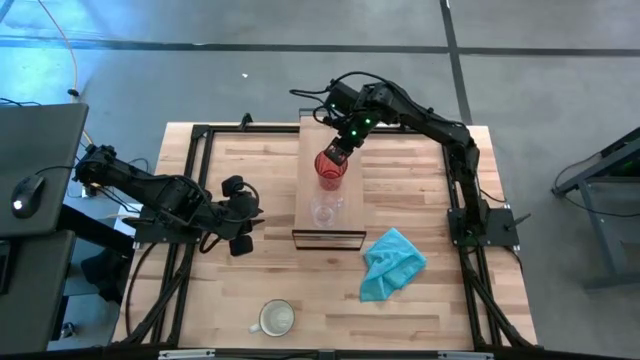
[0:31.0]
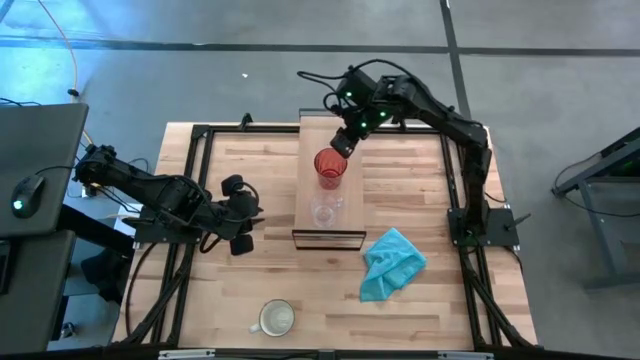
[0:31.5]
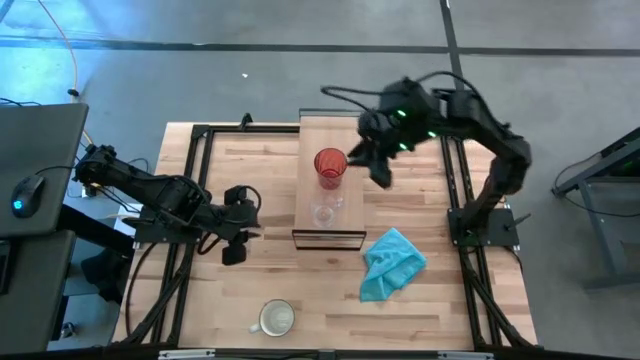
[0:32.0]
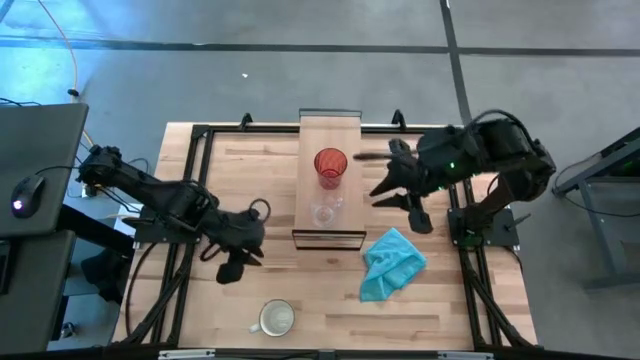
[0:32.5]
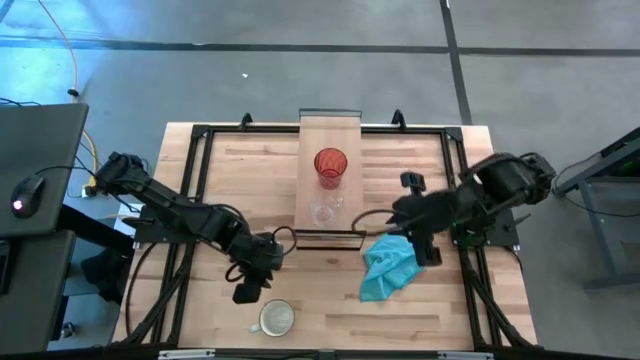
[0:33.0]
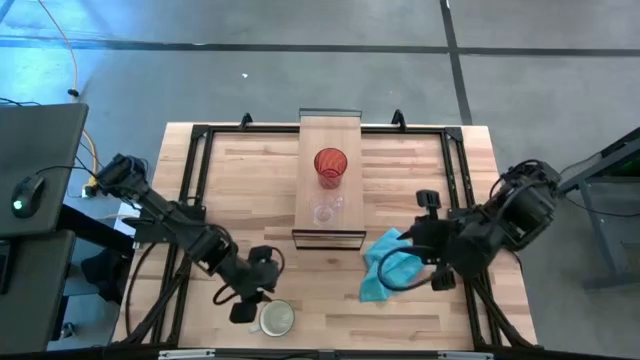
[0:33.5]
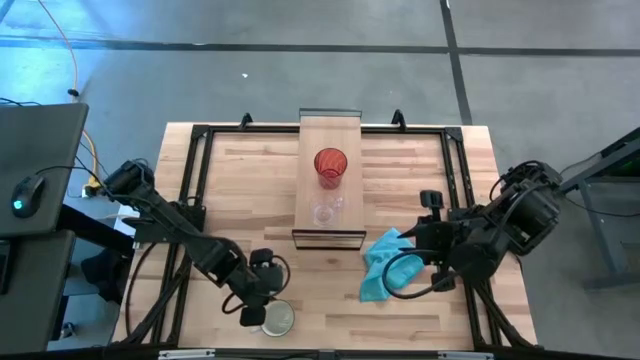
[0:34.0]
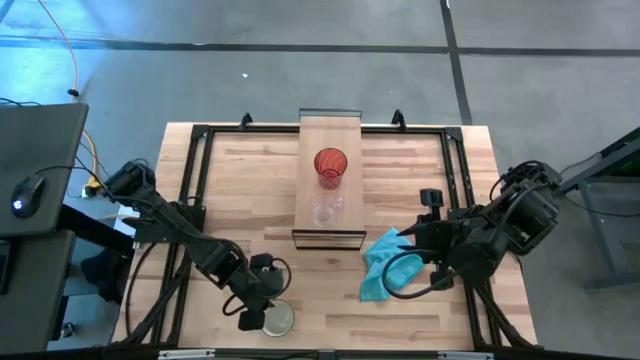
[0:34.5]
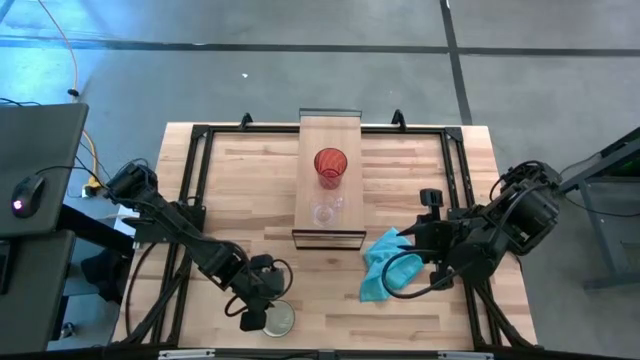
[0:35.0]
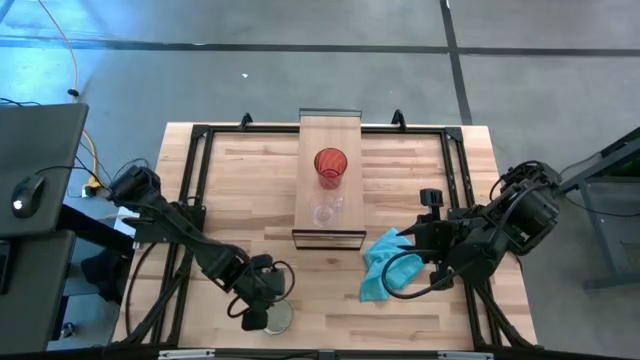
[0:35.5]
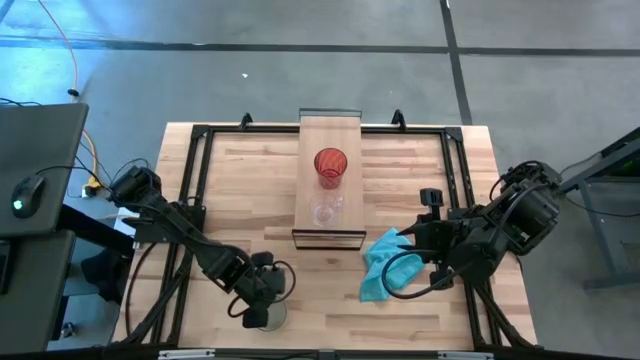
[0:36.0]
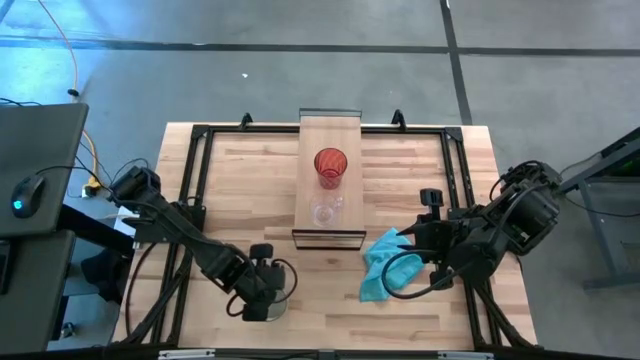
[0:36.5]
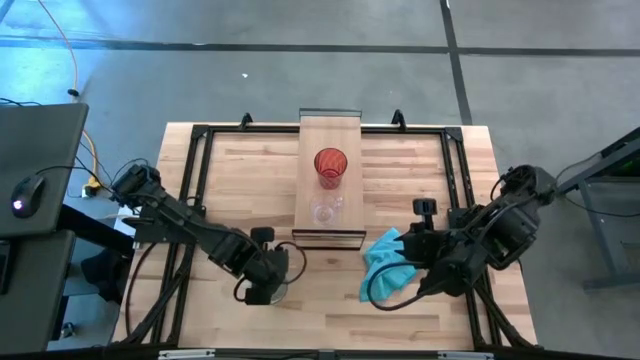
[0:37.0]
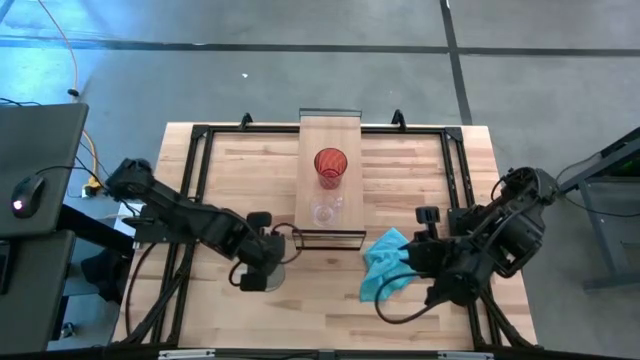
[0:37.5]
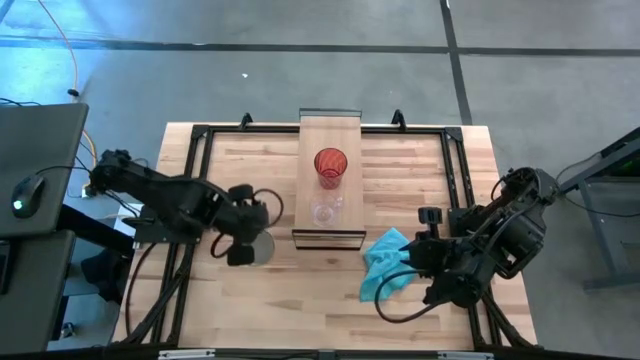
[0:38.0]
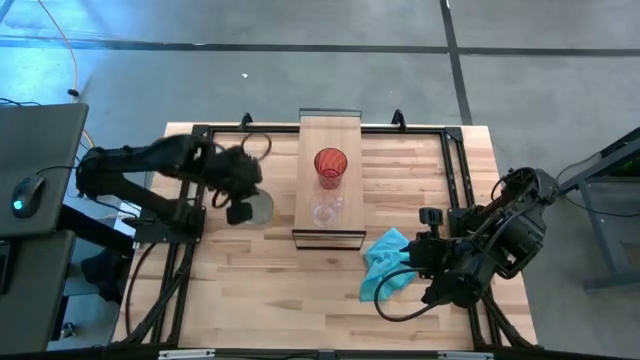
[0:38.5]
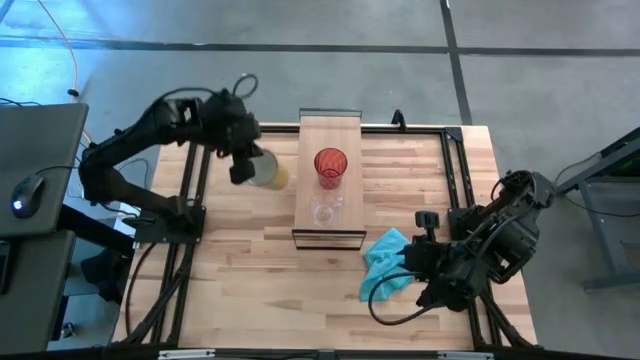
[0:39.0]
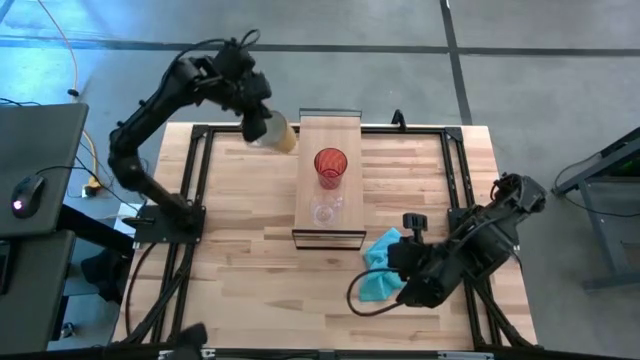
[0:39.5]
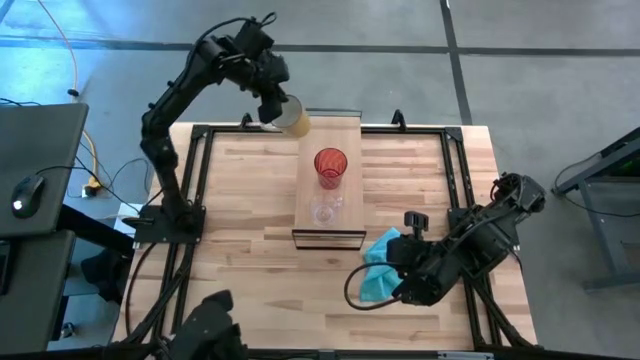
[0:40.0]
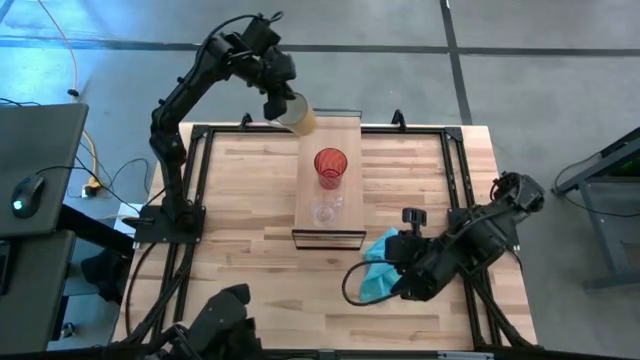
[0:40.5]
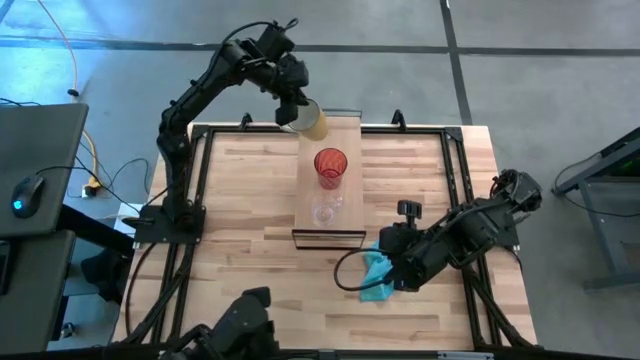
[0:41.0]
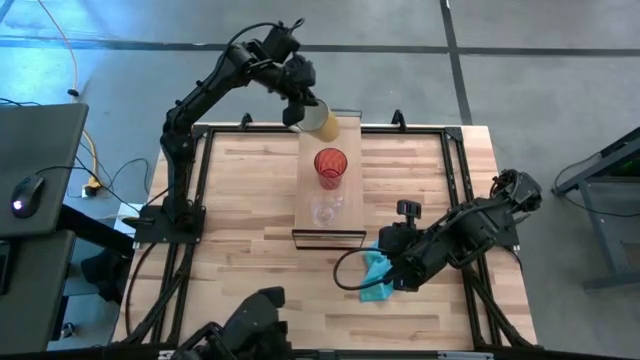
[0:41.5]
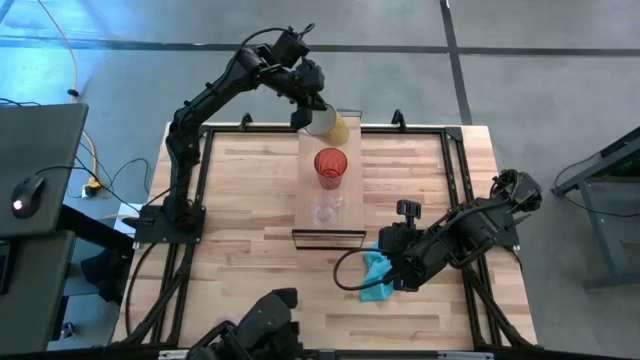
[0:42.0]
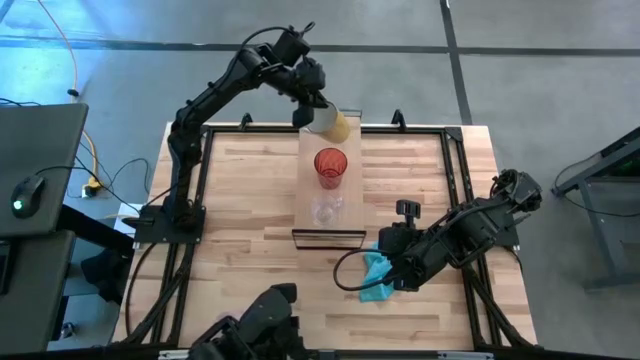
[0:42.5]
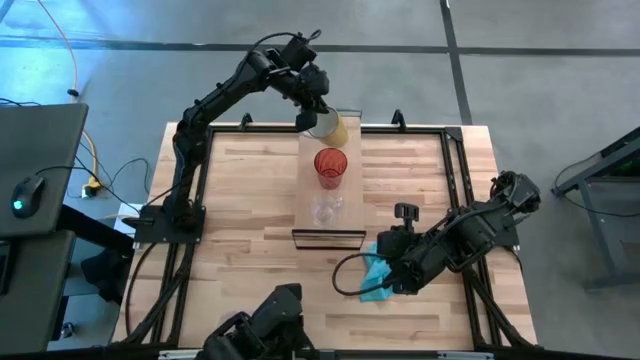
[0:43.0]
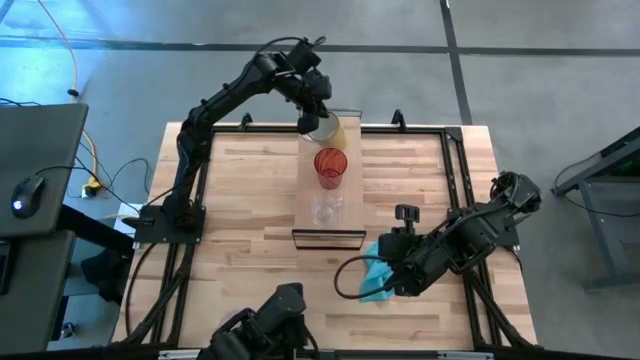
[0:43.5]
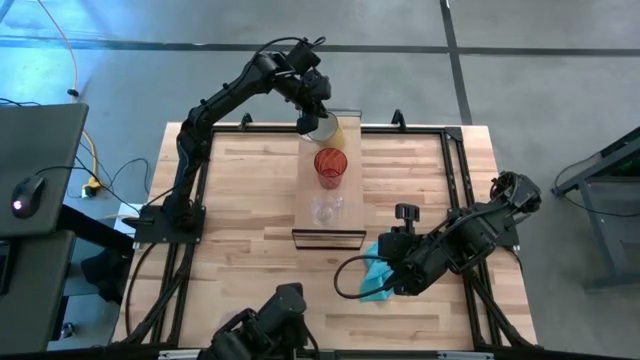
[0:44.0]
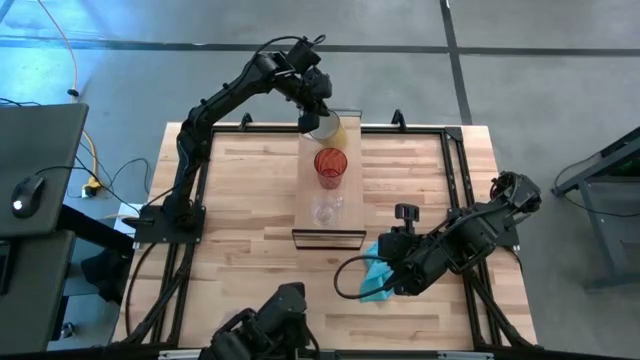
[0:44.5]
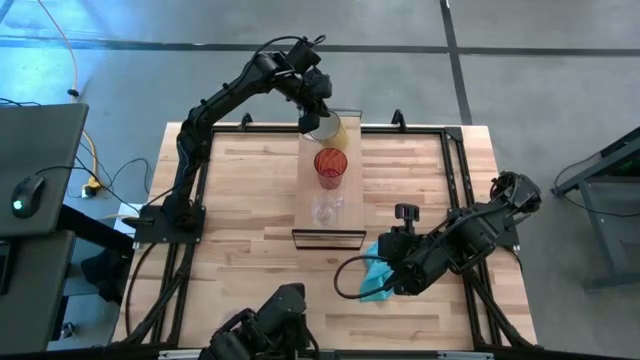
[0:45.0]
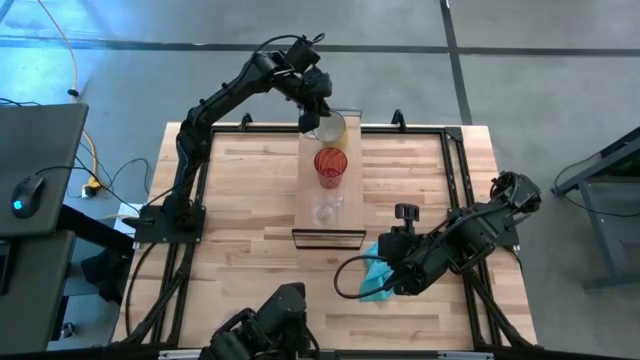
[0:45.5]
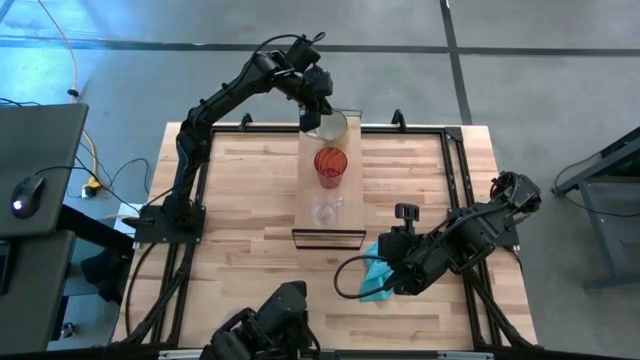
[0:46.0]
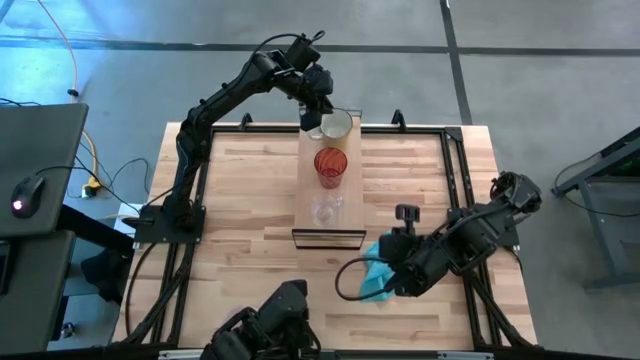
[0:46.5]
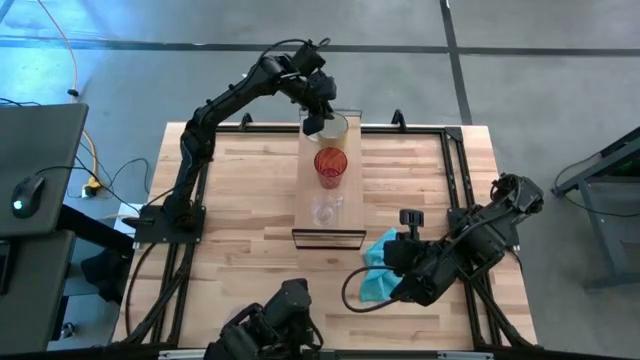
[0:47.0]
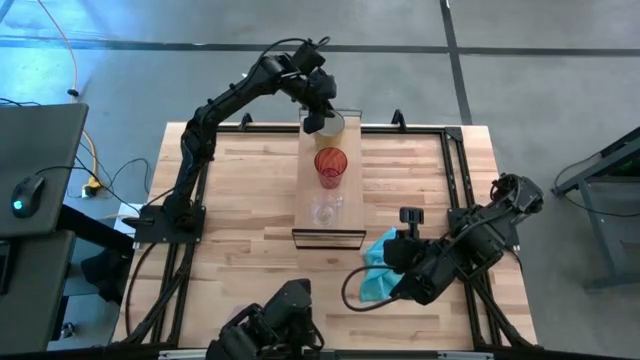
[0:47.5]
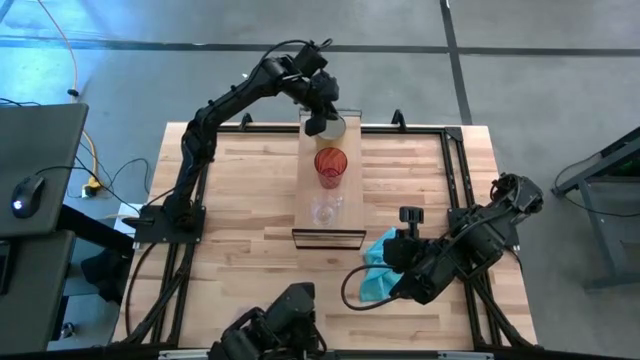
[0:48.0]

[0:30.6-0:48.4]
Task: Stack small to large cups/mugs on shelf
Put the yellow mug on the shelf

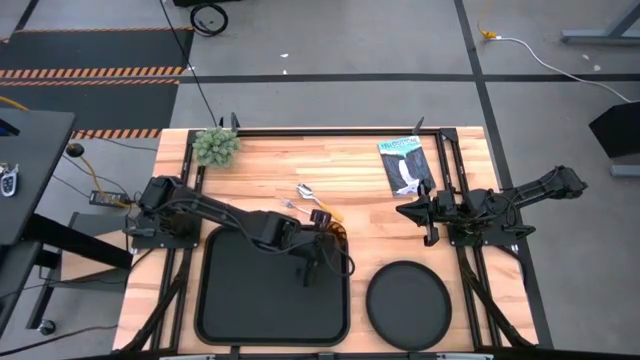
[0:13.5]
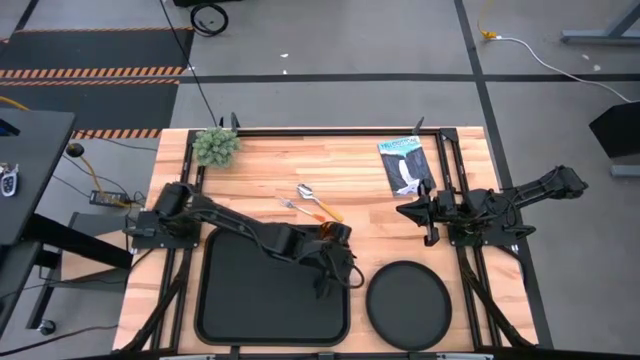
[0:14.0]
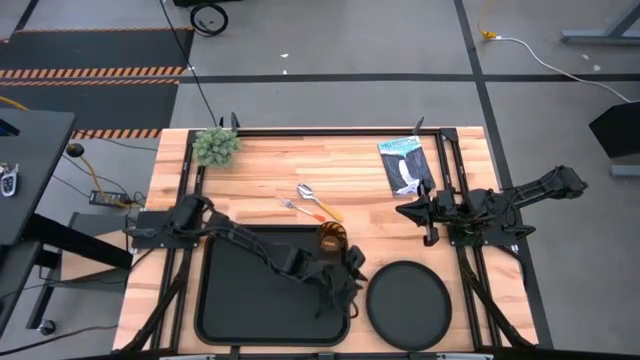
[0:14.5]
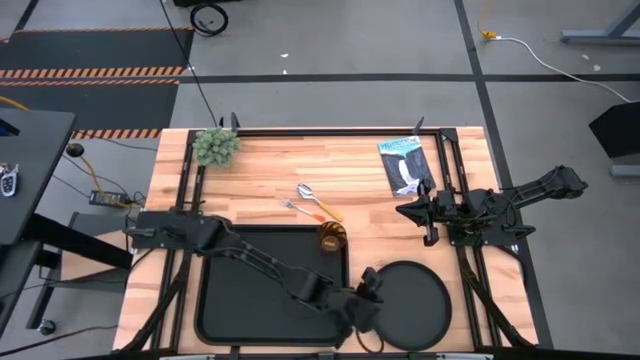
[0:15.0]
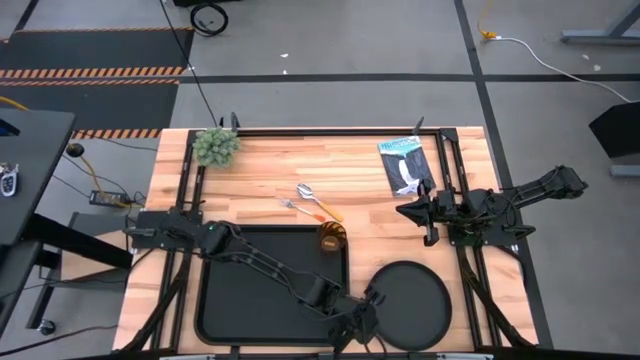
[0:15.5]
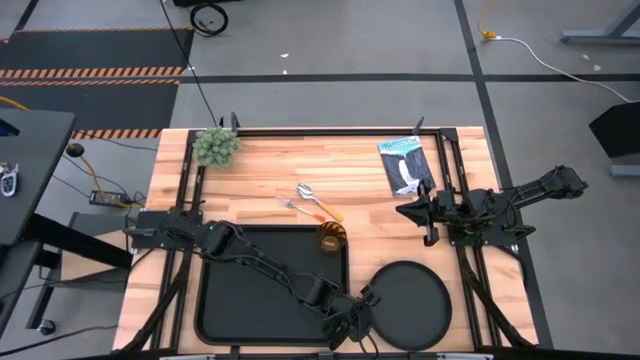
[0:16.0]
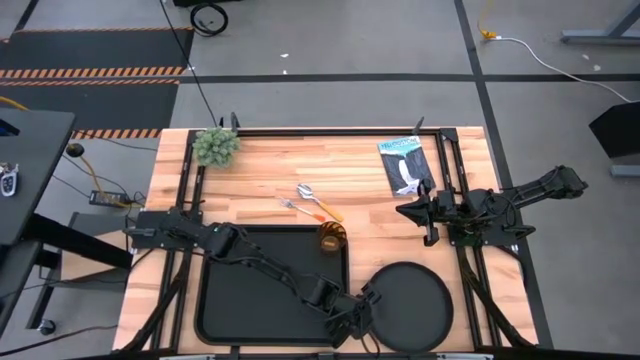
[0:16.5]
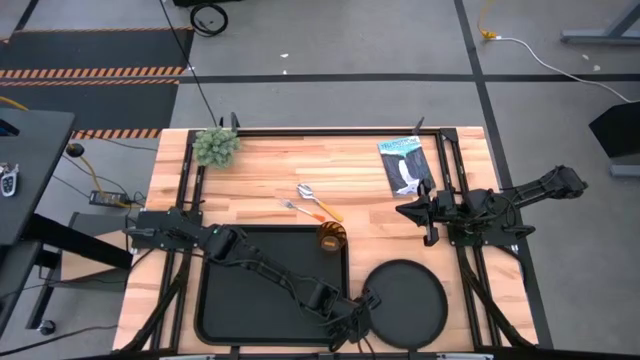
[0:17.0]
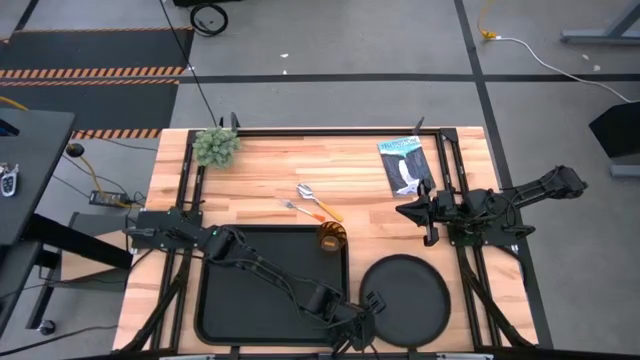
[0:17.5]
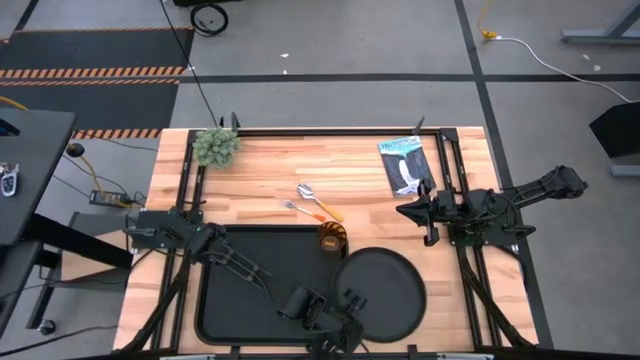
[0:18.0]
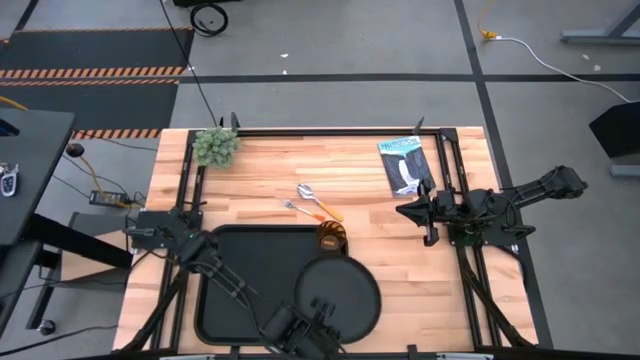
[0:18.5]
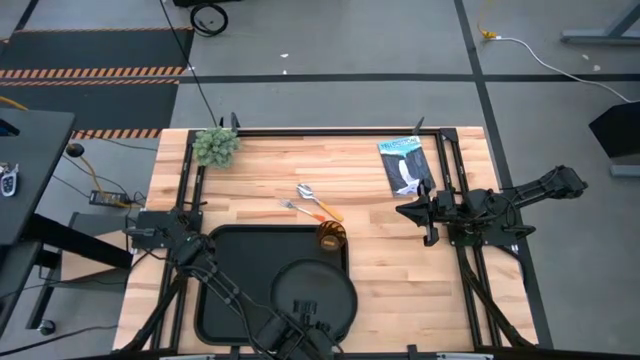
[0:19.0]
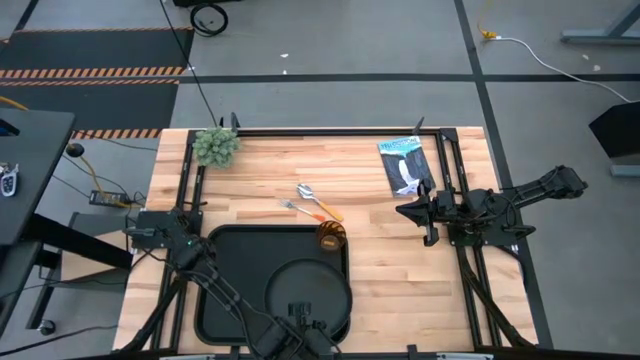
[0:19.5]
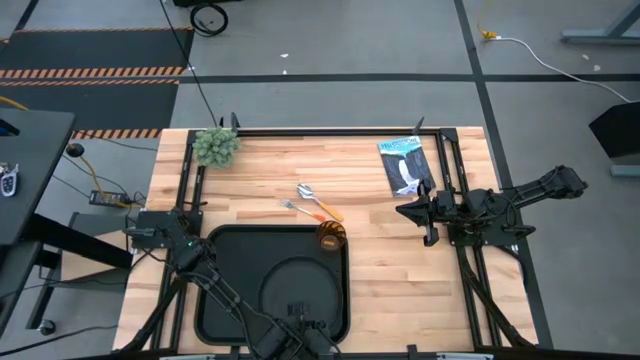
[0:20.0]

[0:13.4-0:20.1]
Task: Pick and place plate/cup/fork/spoon on tray
Put the black plate on the black tray on the bottom left of the brown cup
